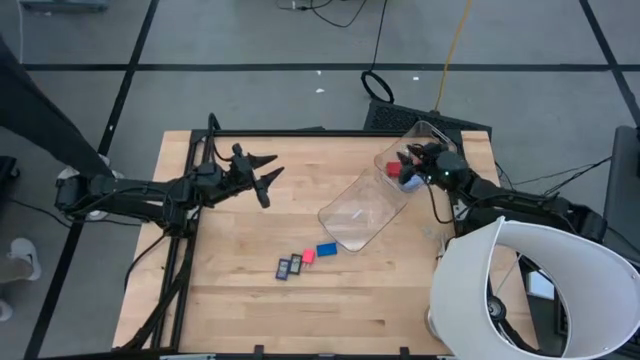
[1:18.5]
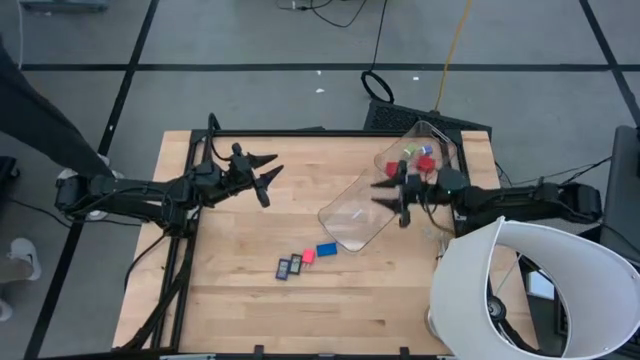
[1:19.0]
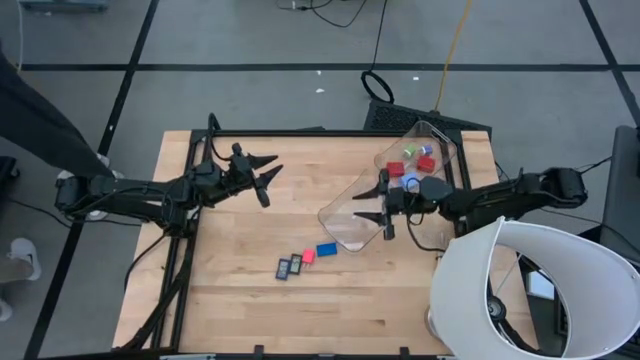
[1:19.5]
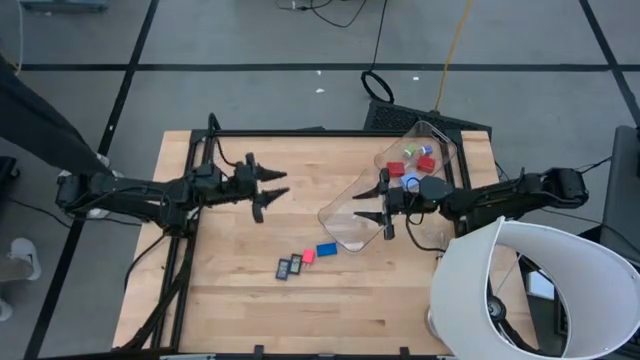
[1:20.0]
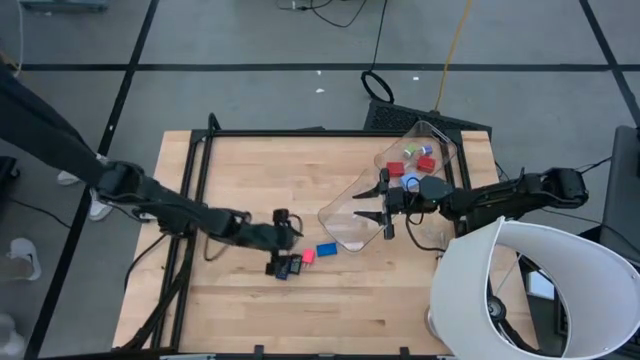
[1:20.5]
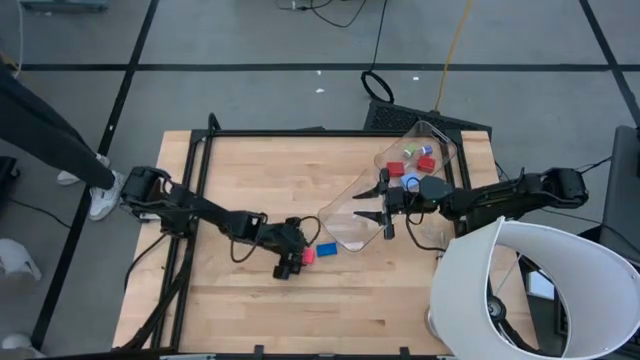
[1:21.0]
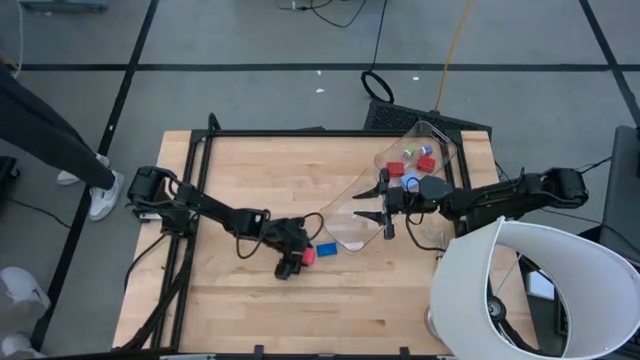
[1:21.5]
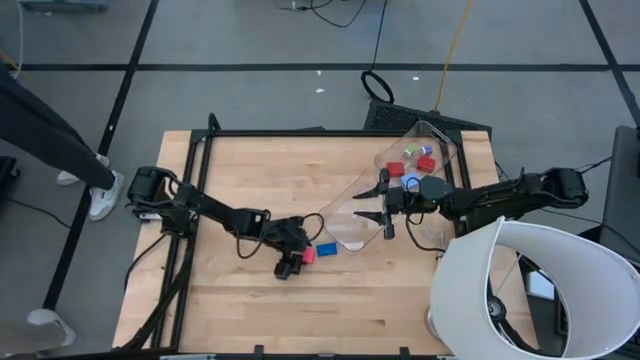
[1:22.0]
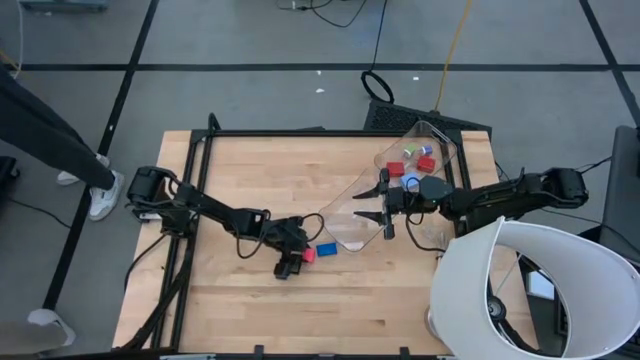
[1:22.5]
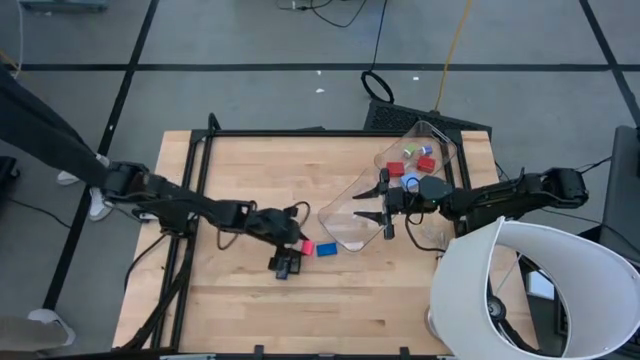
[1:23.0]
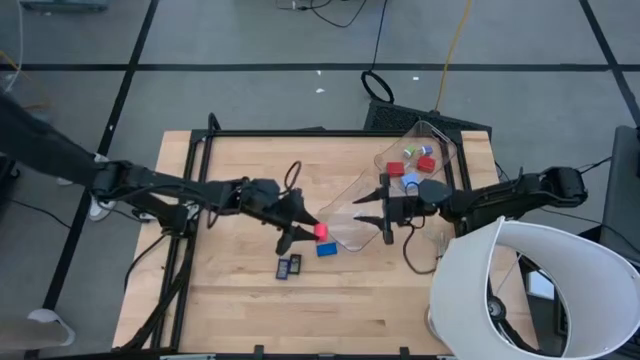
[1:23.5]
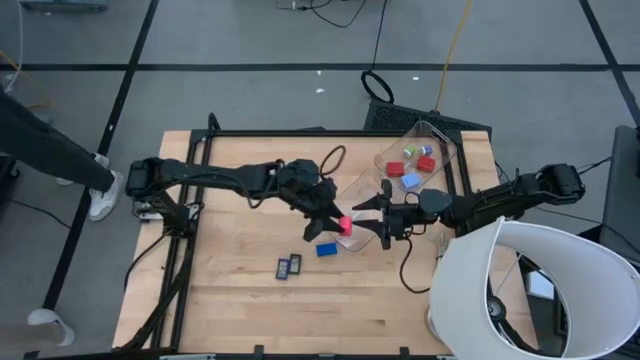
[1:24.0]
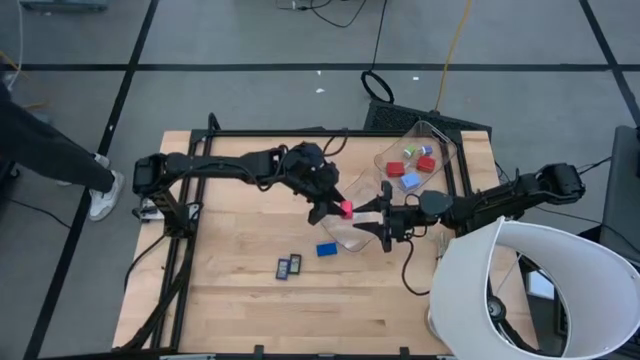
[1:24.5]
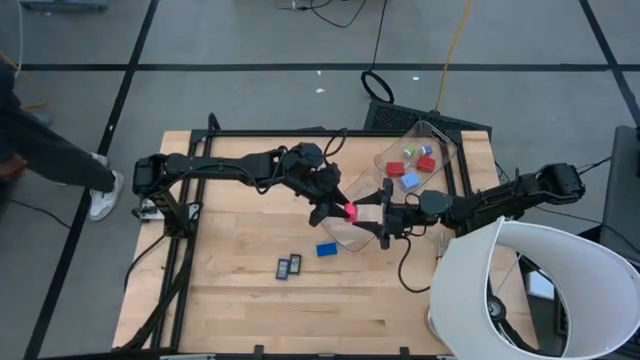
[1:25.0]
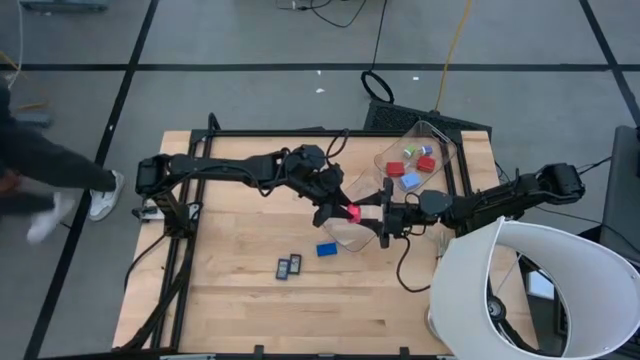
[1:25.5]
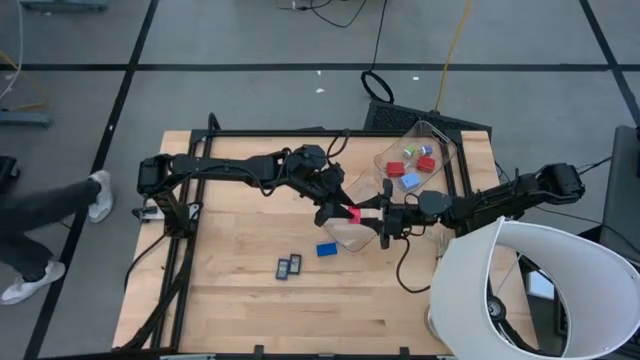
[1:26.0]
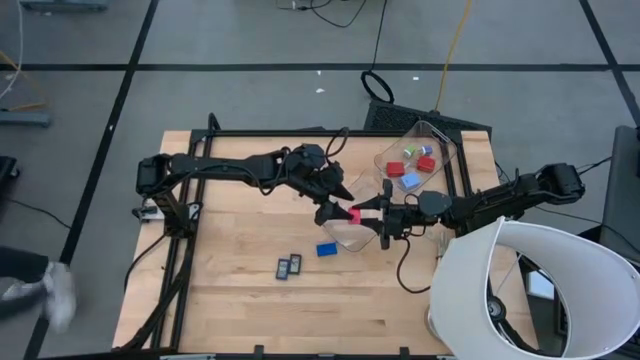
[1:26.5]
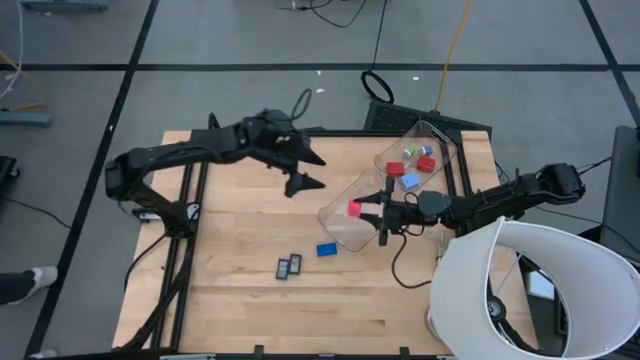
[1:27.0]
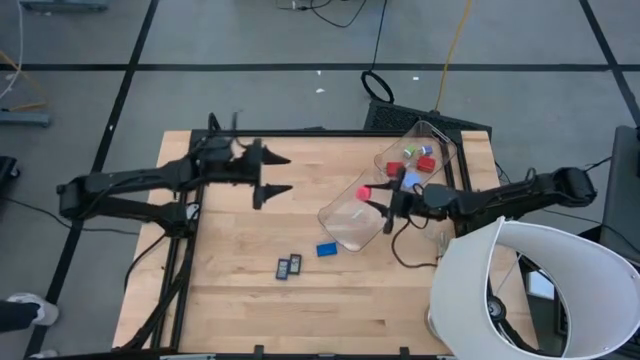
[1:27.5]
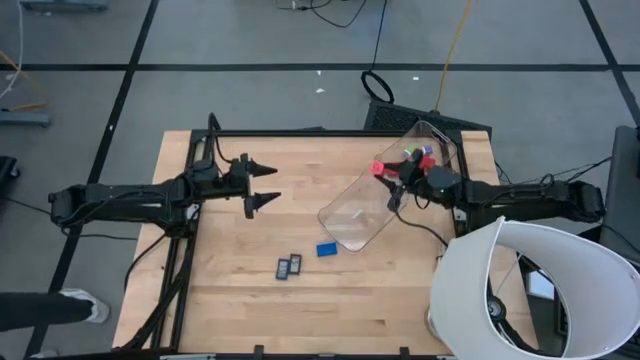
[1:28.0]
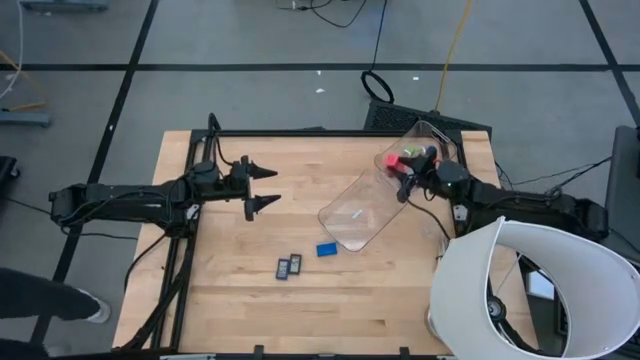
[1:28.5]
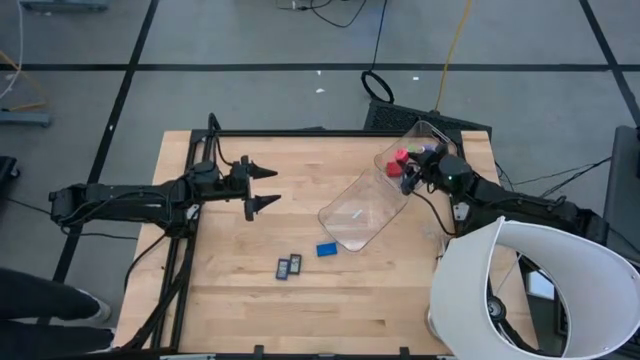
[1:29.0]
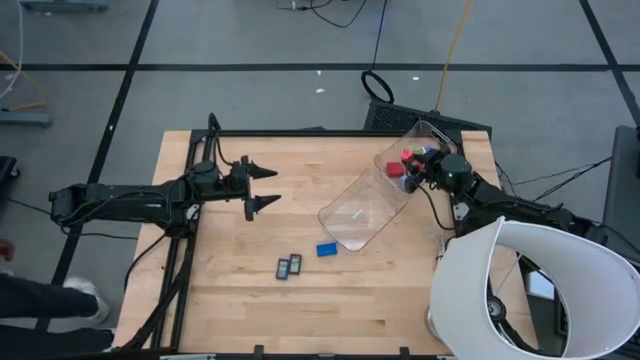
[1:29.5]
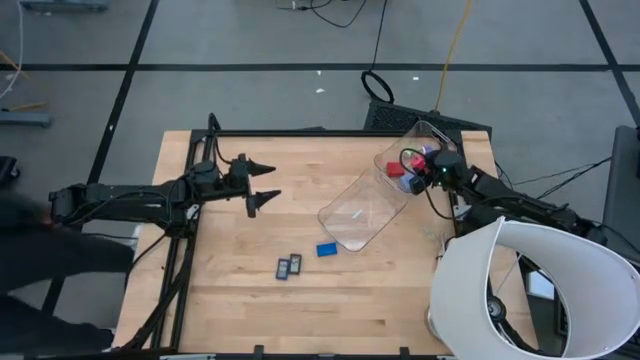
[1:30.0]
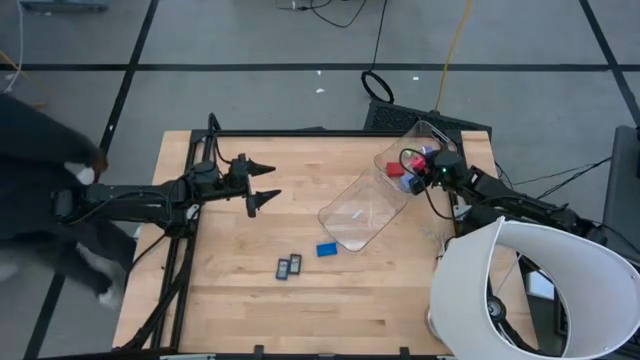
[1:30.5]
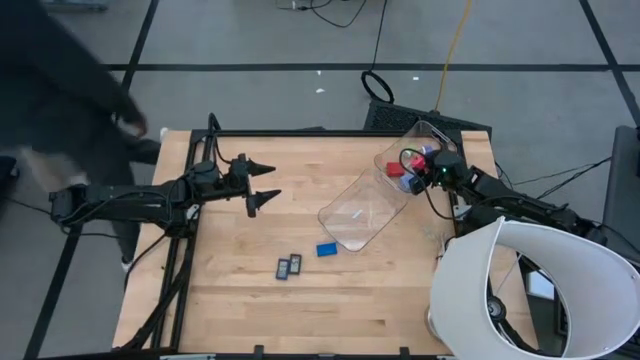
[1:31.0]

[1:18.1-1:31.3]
Task: Pick & Place Office items
Put the pink charger adapter into the right transparent bin

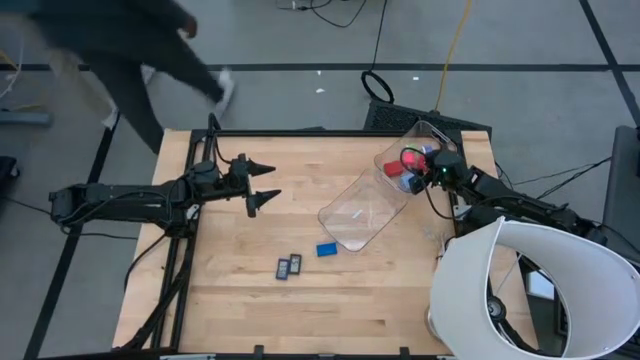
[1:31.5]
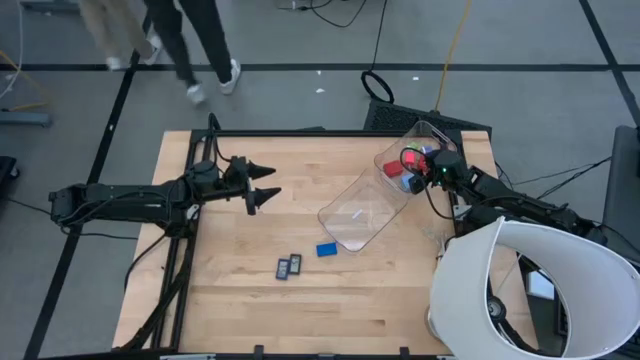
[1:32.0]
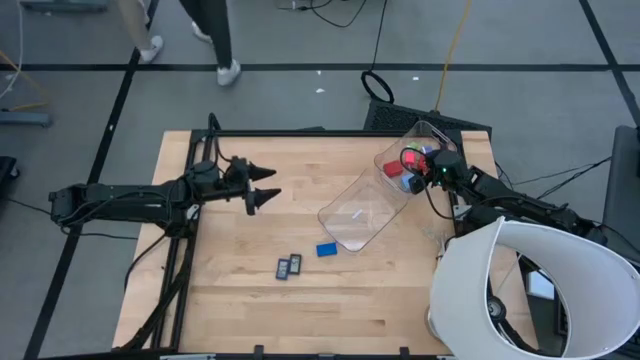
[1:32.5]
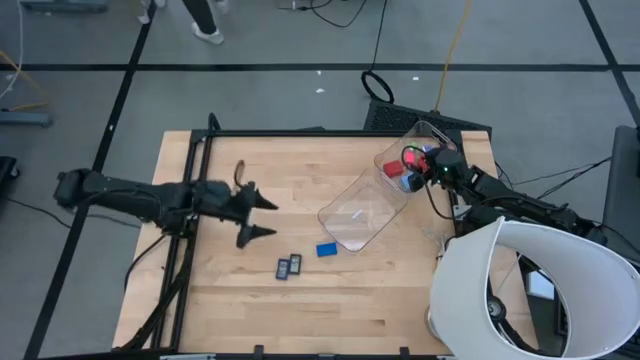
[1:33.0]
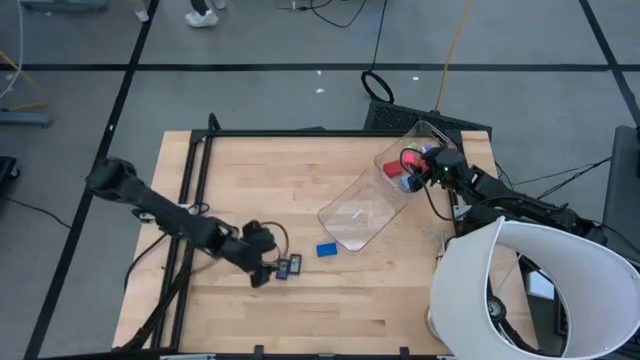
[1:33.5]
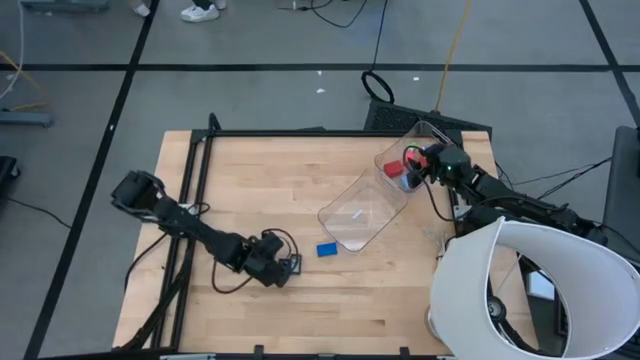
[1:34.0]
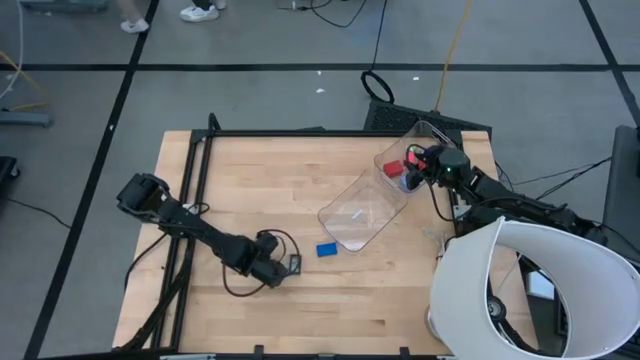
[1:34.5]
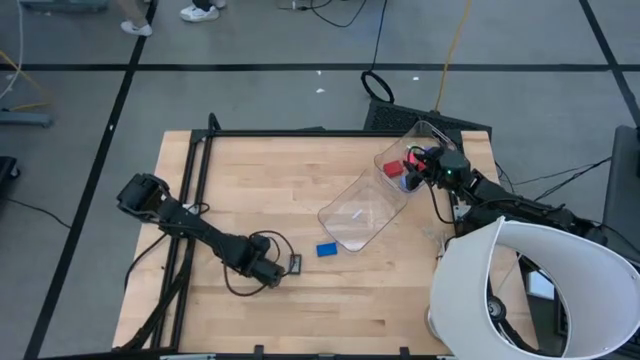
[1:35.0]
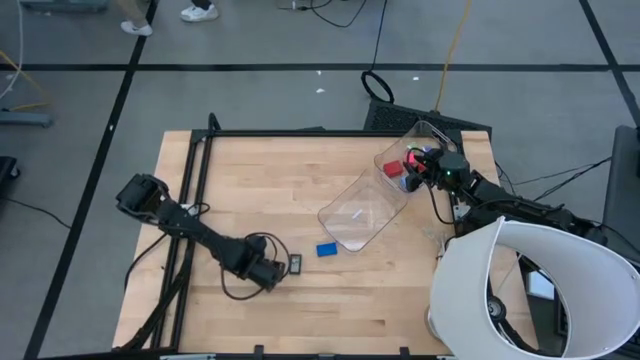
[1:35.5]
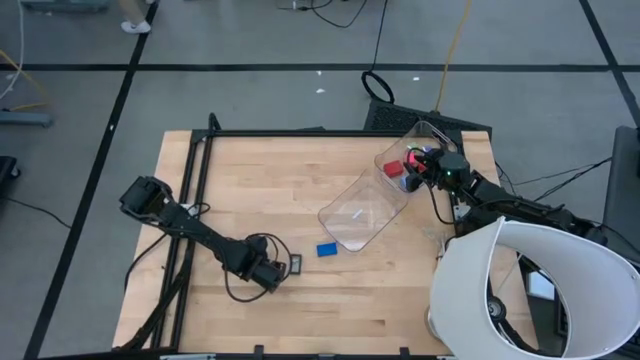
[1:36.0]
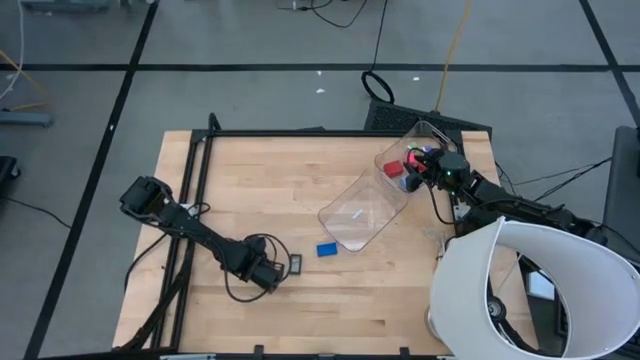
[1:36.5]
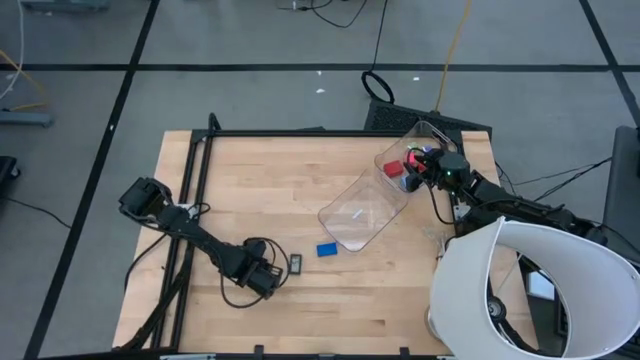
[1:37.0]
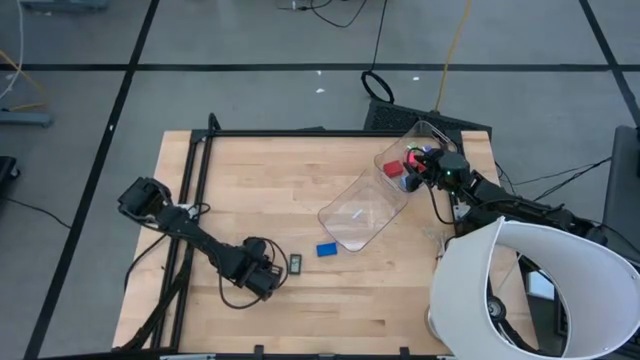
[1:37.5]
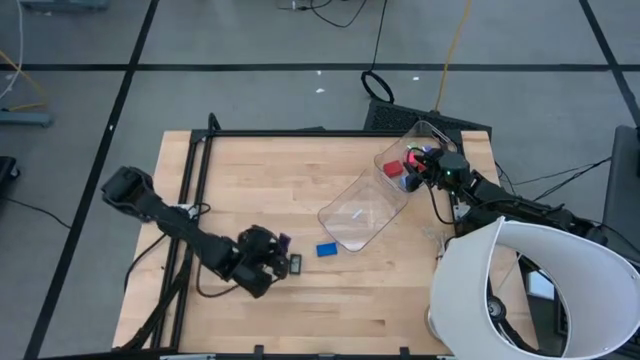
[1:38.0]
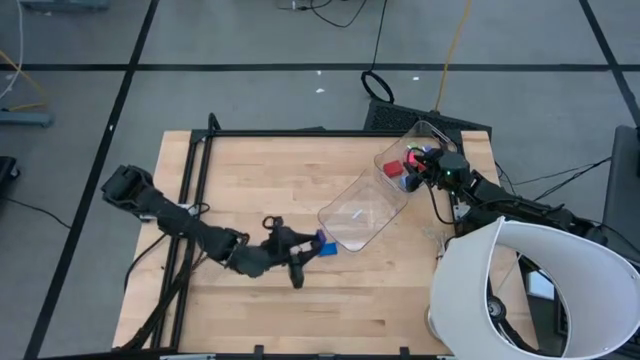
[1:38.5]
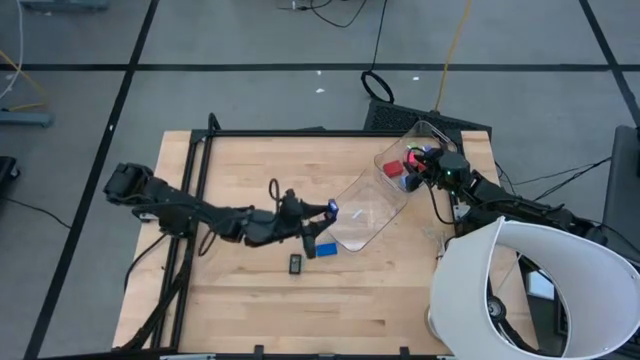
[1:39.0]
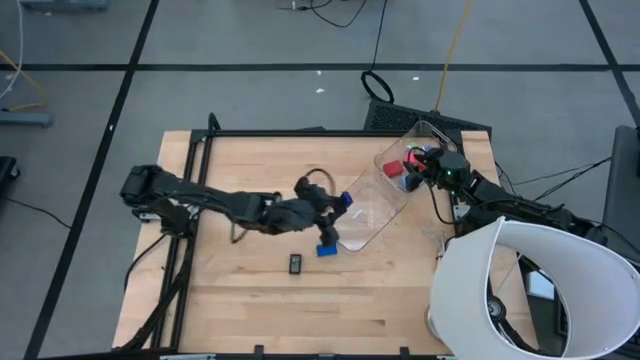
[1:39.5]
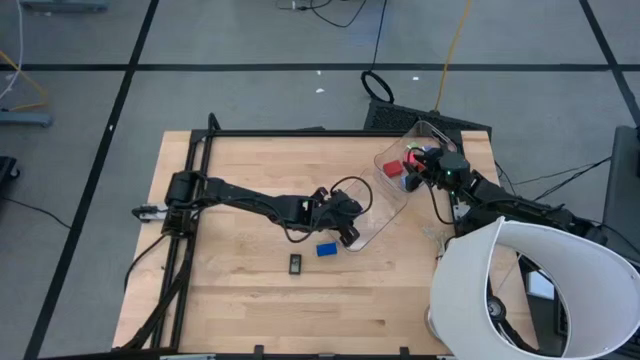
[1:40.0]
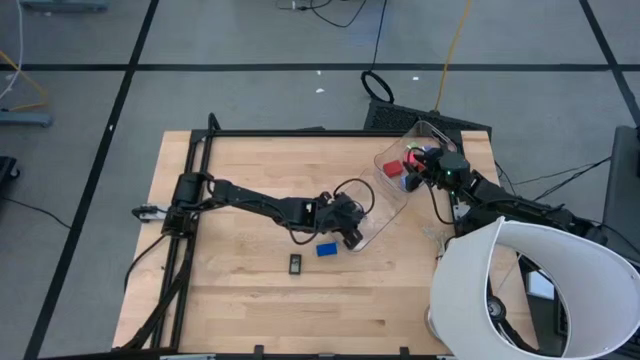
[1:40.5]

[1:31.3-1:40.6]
Put the dark blue digital timer into the left transparent bin
